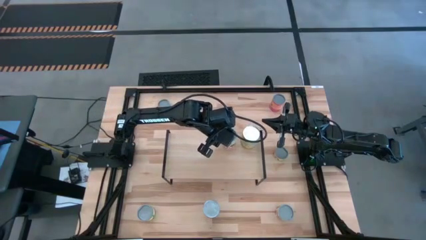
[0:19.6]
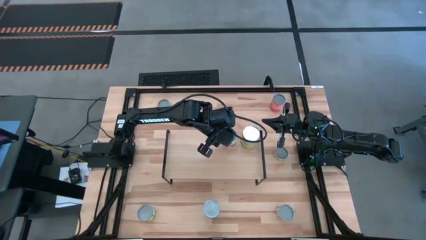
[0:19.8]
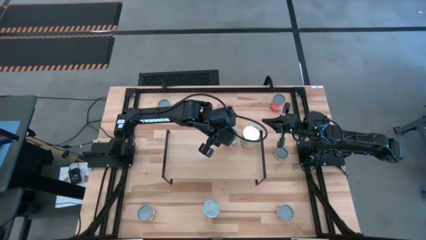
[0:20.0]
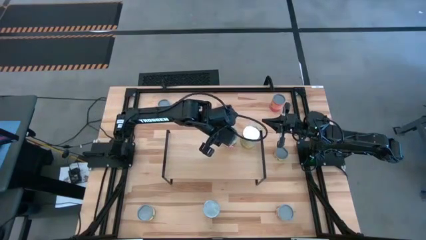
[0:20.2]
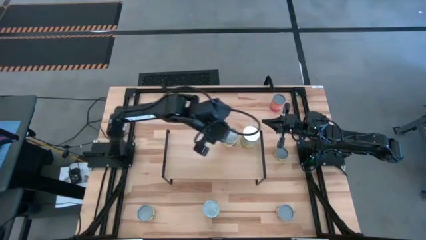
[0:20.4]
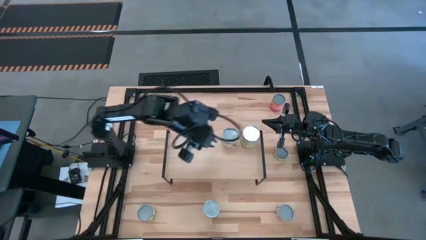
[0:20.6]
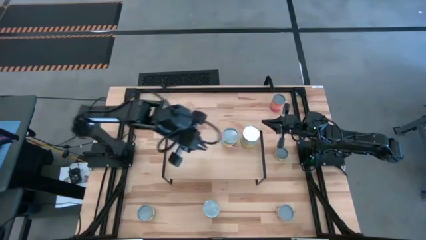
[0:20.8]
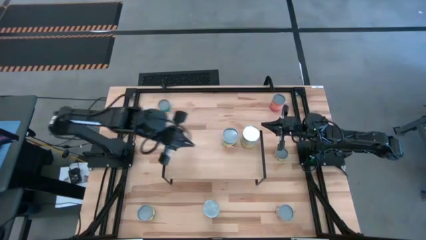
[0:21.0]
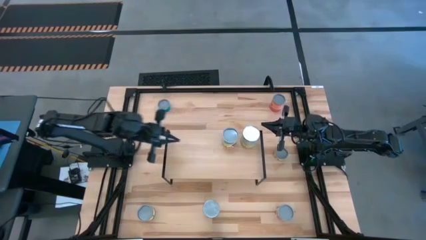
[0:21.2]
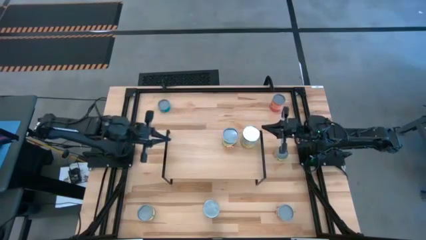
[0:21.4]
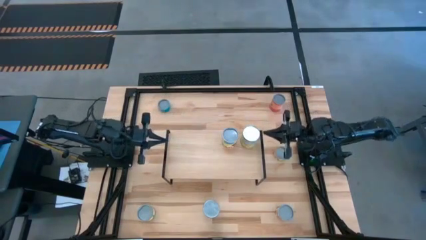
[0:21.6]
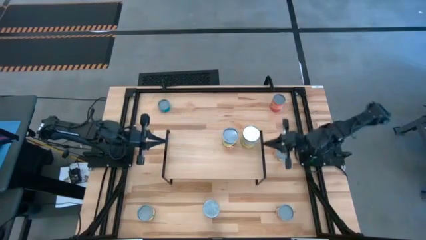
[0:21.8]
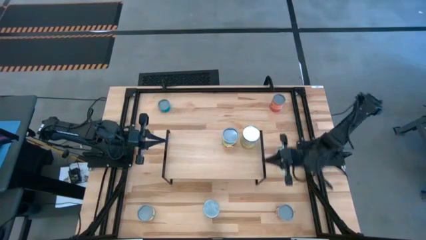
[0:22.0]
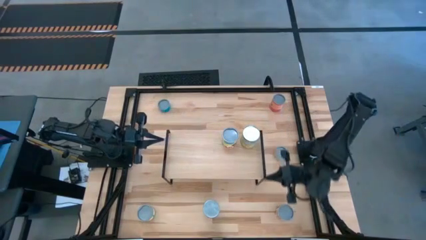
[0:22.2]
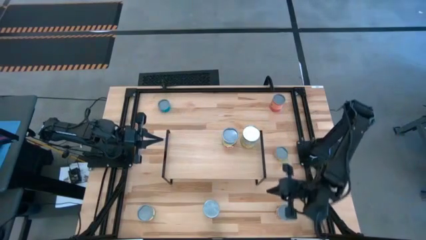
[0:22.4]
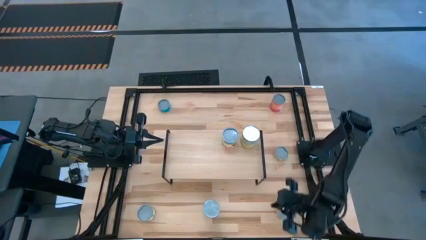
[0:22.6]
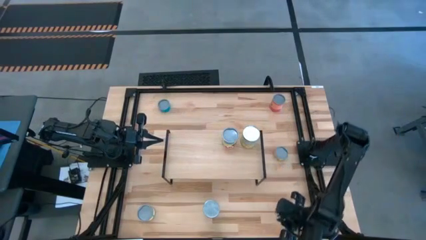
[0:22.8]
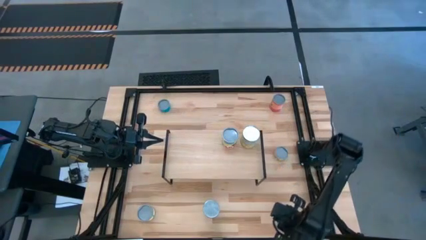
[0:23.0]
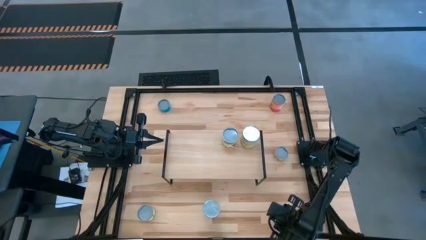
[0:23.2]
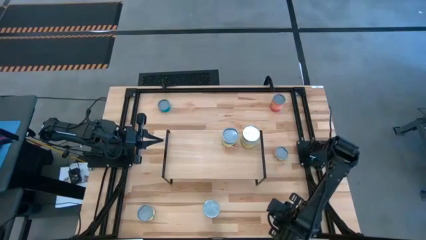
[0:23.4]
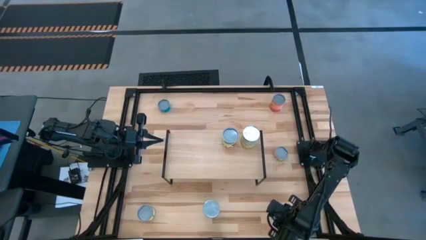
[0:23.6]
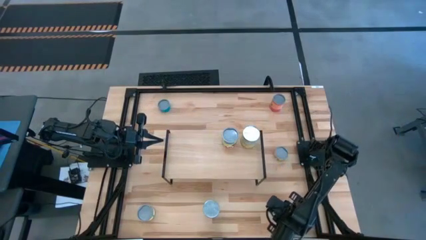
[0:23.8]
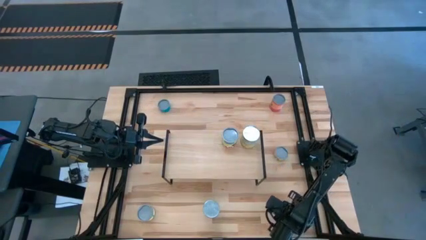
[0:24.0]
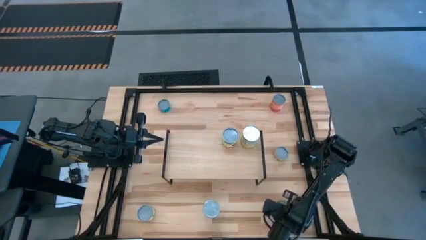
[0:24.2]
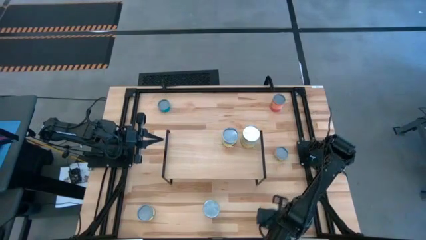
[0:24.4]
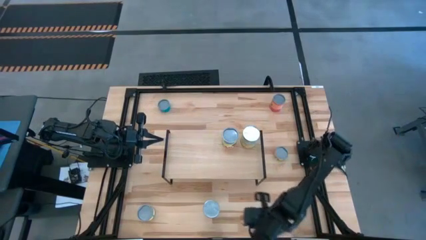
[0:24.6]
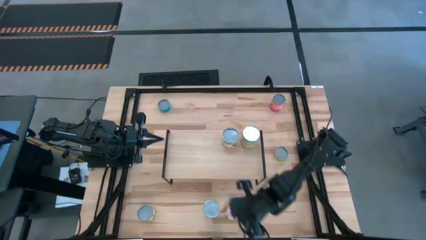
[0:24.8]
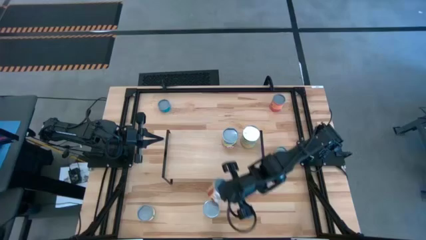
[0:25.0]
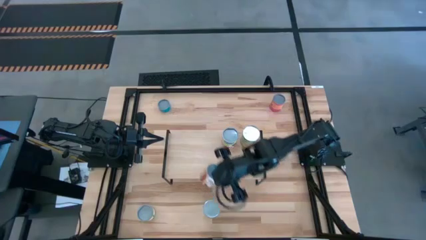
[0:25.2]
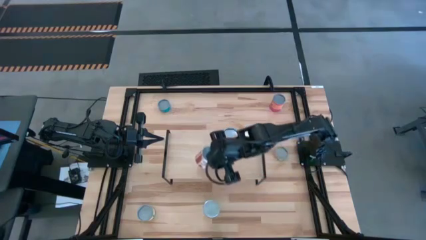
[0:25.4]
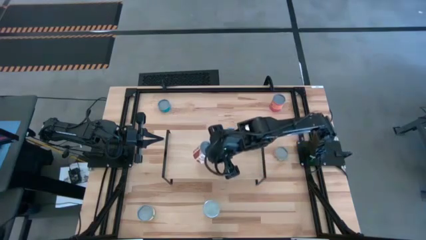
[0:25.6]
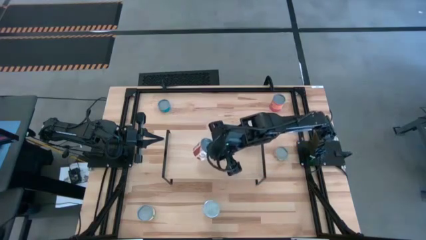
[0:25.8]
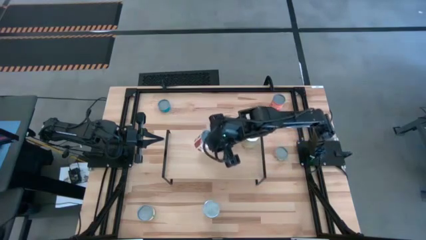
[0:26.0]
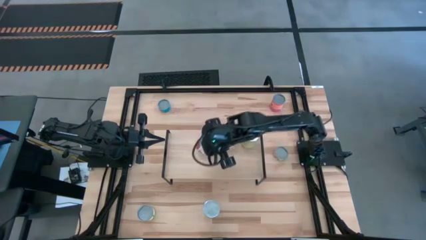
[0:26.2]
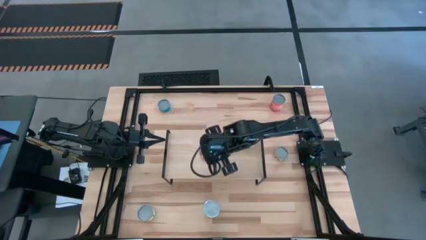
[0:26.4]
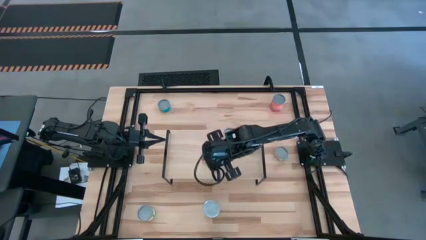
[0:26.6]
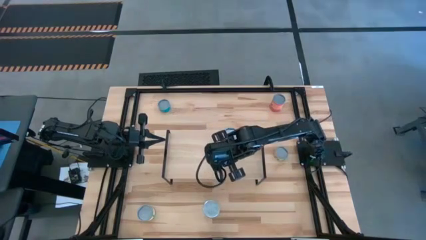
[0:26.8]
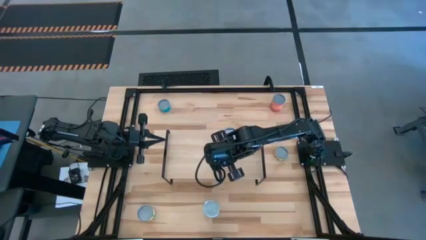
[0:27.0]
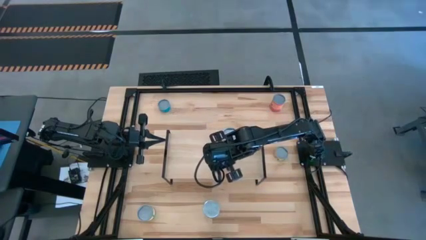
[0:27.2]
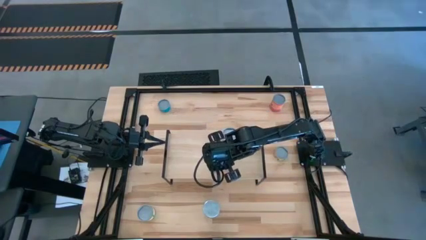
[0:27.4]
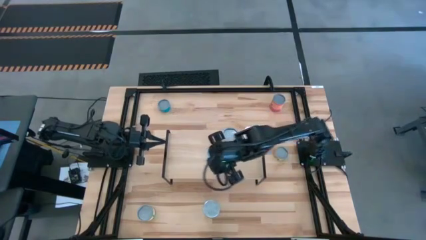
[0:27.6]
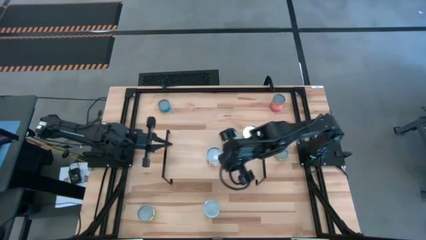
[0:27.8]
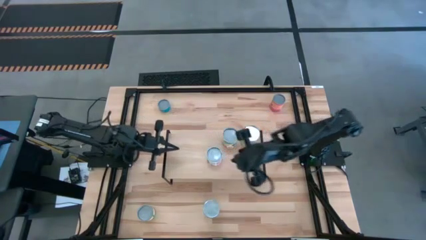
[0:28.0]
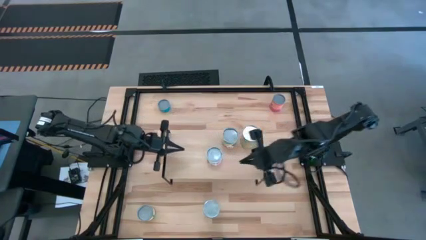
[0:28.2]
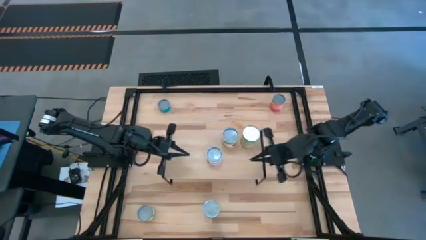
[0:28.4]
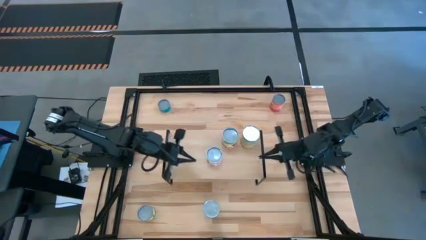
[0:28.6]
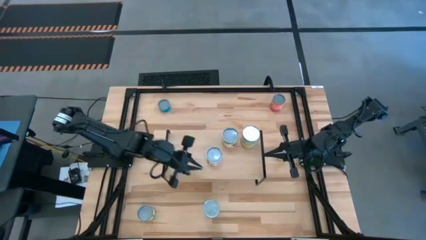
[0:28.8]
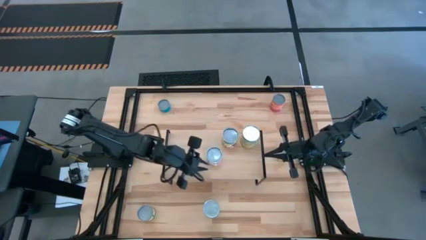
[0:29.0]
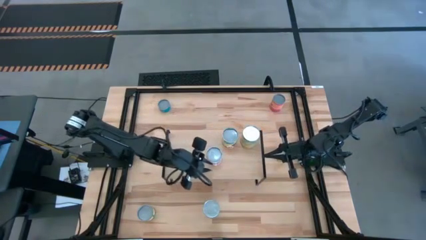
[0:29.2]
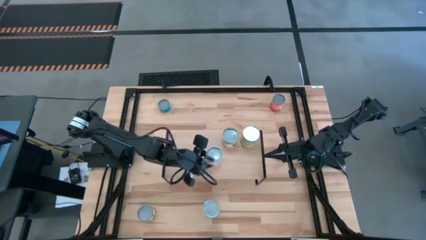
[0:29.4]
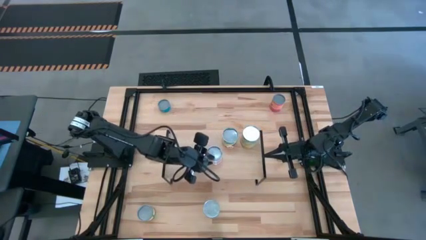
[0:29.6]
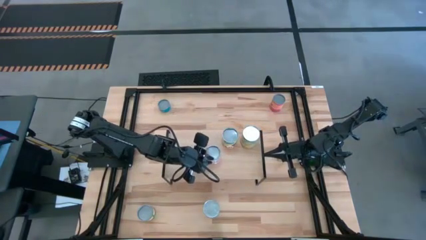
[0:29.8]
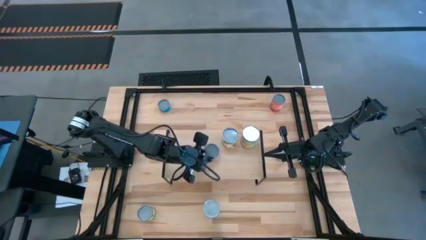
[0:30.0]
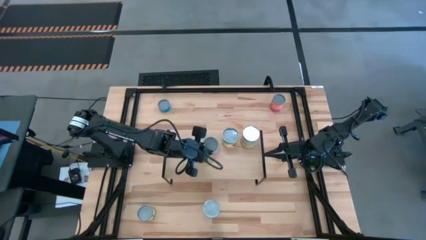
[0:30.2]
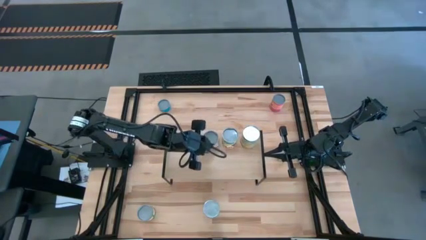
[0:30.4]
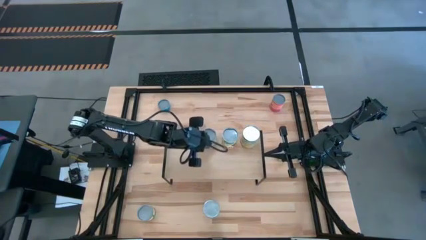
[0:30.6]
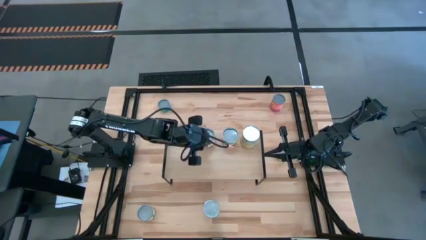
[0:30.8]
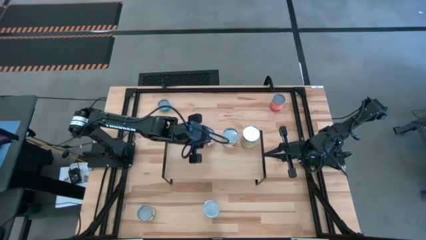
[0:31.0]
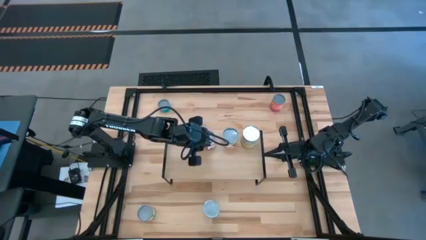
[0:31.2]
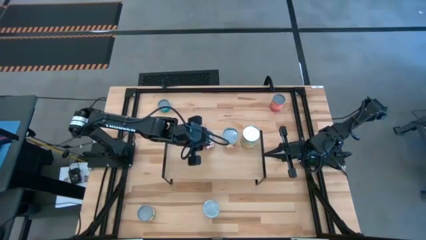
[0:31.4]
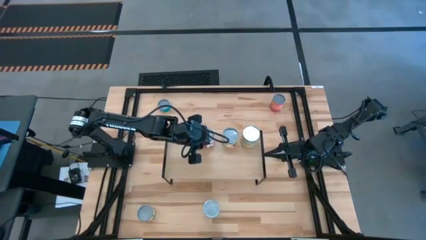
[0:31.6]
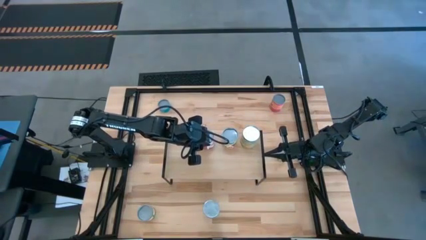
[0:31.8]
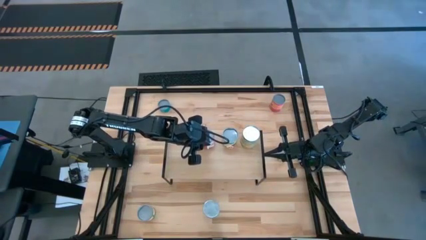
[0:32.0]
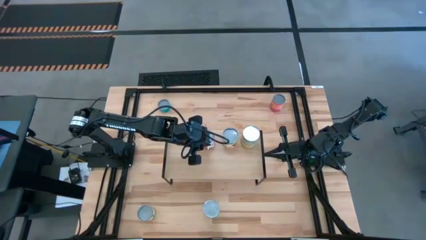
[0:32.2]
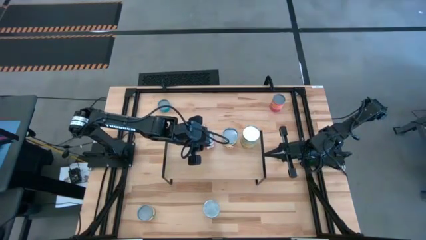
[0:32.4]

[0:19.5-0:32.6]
Task: Pick and place cans onto a shelf
Put the canned diced tomatoes on the shelf
